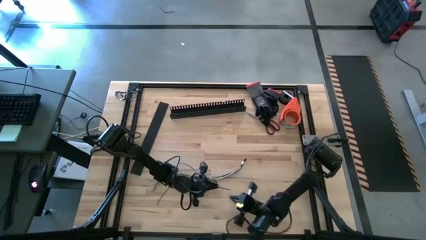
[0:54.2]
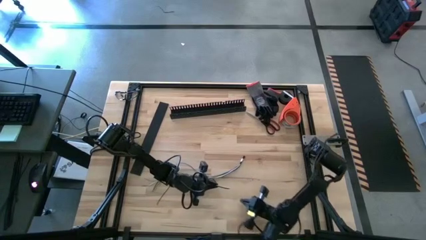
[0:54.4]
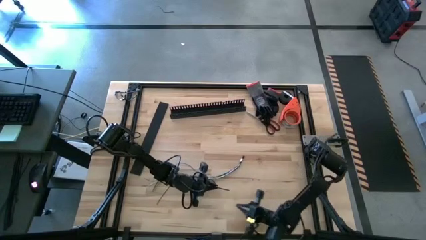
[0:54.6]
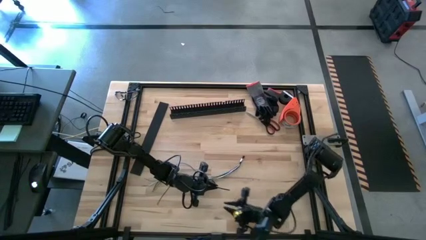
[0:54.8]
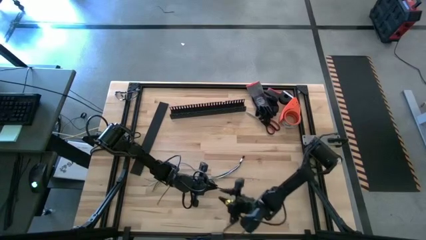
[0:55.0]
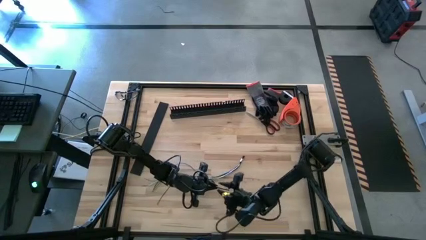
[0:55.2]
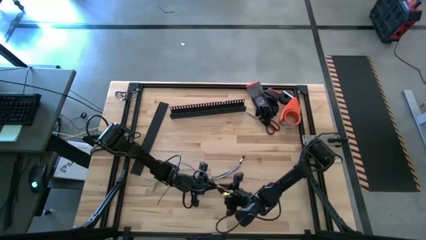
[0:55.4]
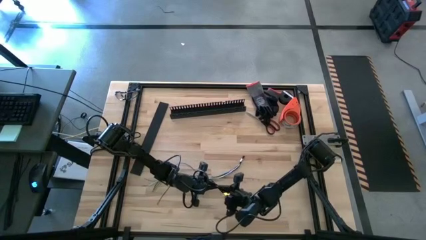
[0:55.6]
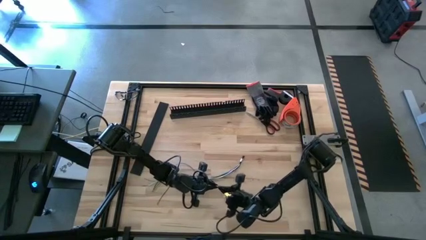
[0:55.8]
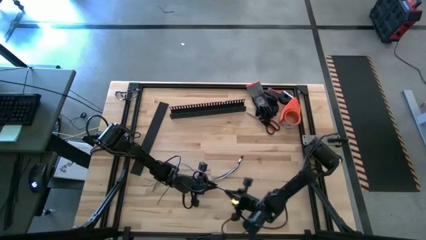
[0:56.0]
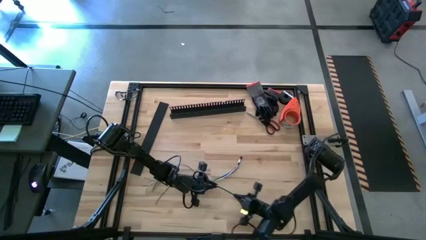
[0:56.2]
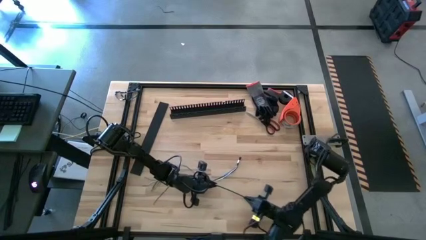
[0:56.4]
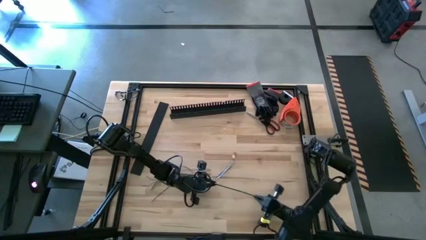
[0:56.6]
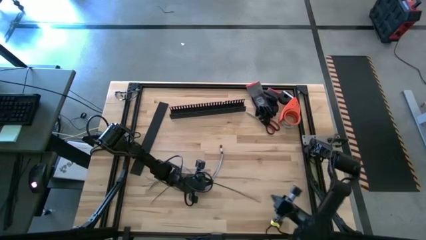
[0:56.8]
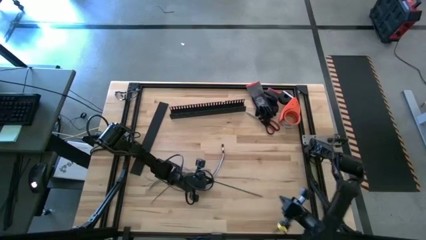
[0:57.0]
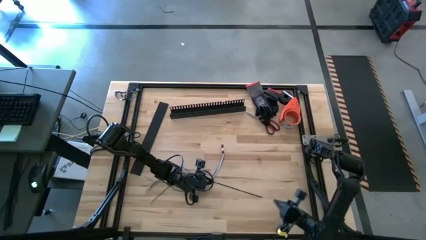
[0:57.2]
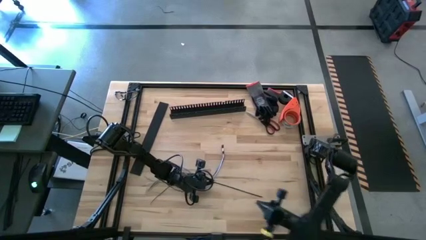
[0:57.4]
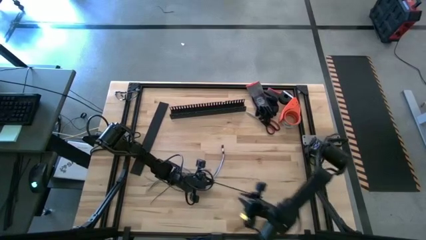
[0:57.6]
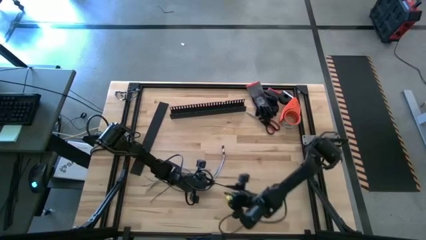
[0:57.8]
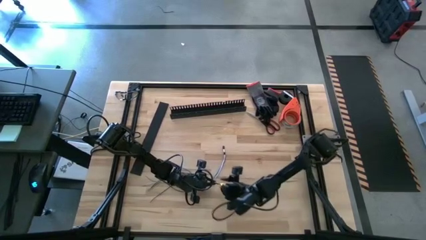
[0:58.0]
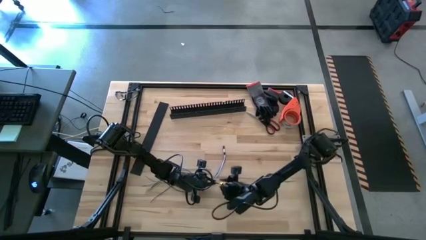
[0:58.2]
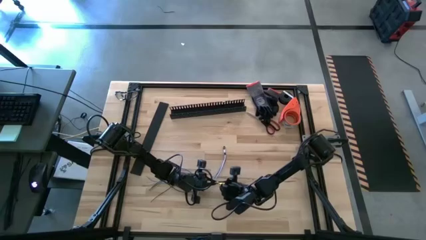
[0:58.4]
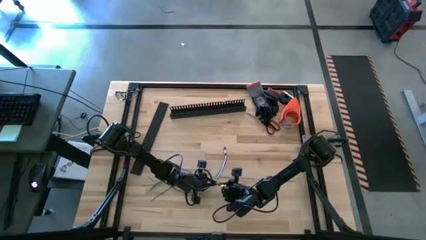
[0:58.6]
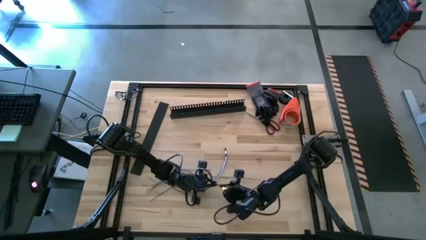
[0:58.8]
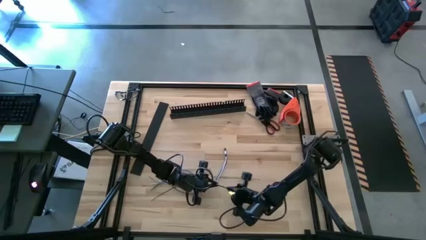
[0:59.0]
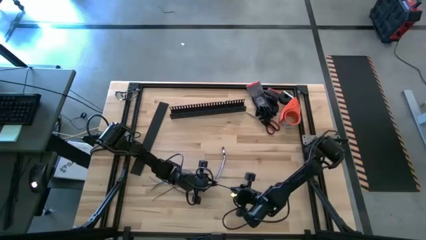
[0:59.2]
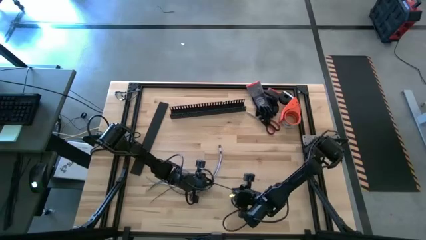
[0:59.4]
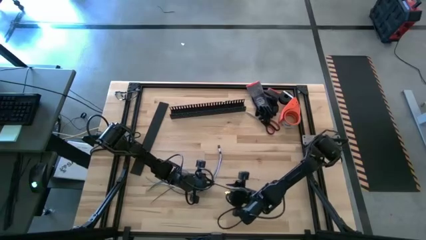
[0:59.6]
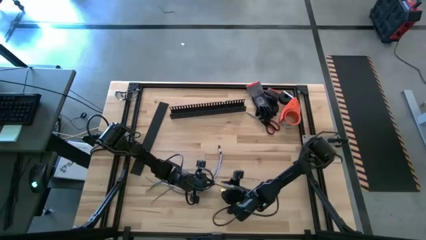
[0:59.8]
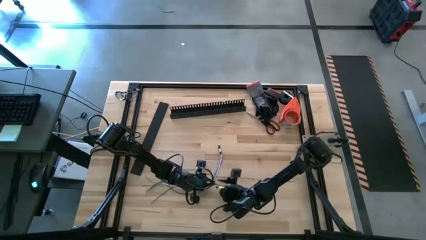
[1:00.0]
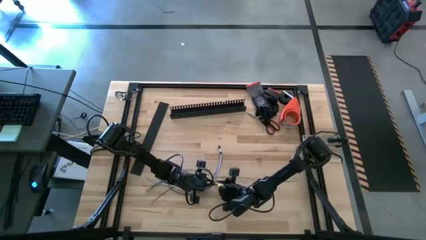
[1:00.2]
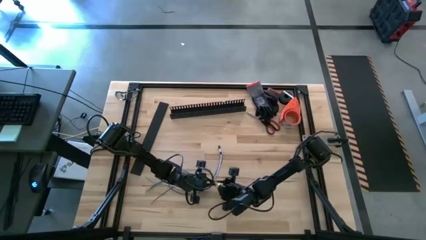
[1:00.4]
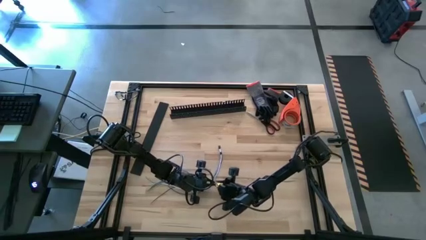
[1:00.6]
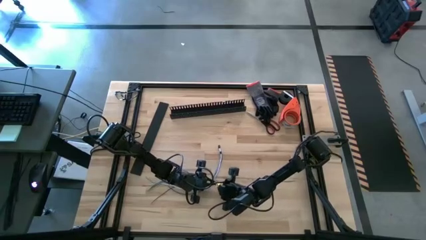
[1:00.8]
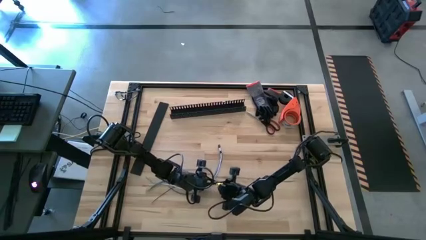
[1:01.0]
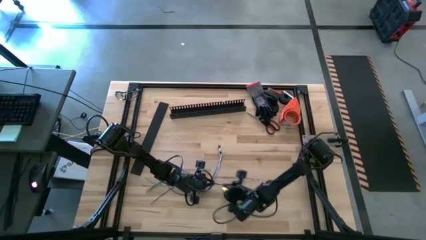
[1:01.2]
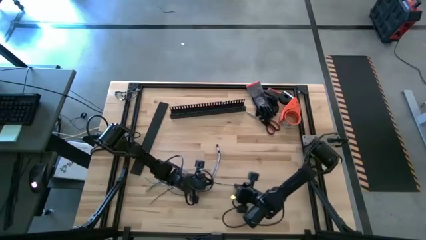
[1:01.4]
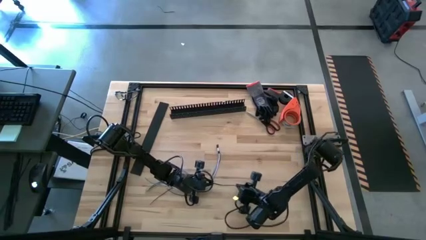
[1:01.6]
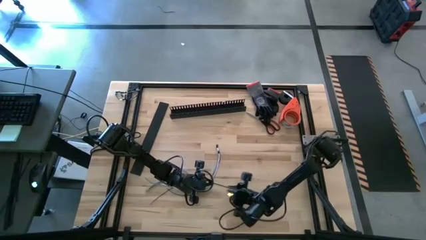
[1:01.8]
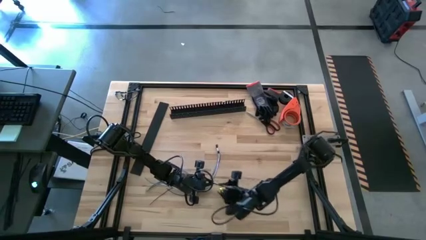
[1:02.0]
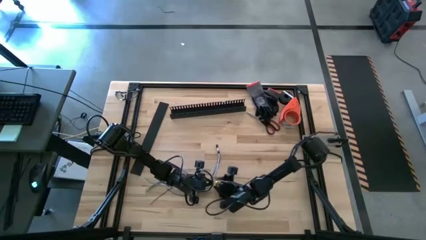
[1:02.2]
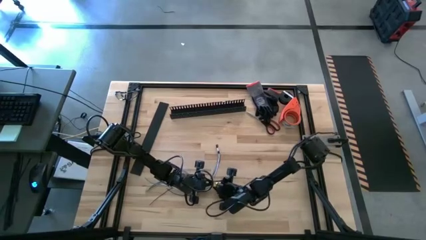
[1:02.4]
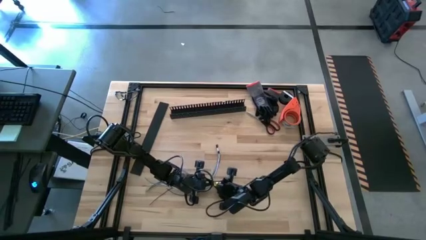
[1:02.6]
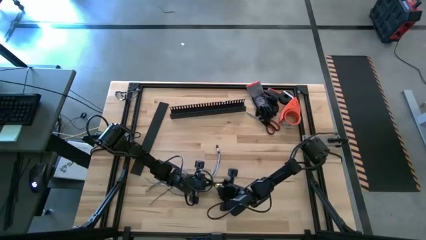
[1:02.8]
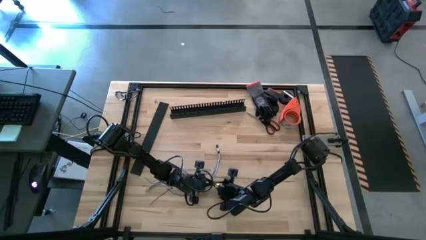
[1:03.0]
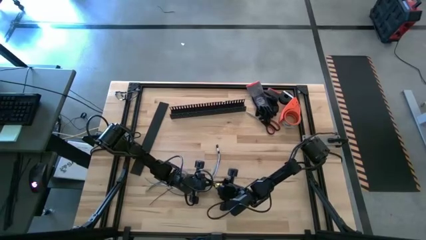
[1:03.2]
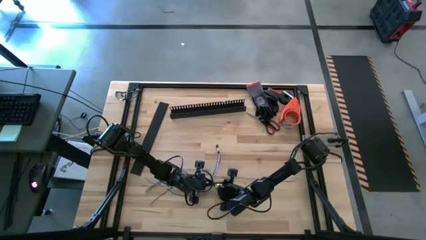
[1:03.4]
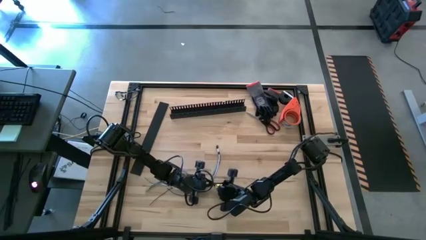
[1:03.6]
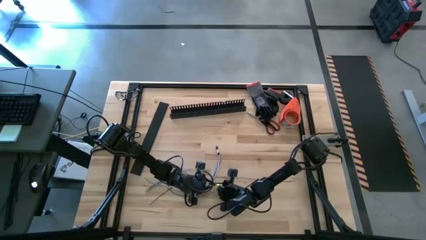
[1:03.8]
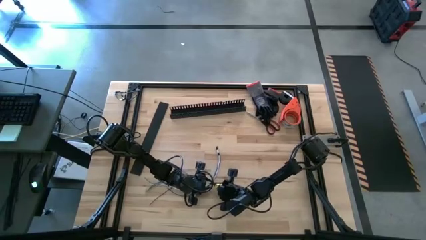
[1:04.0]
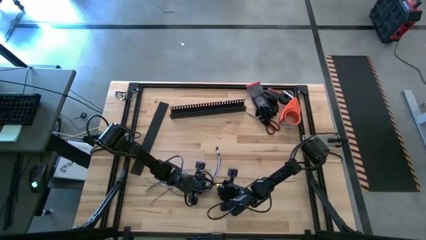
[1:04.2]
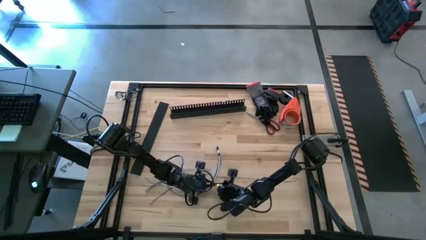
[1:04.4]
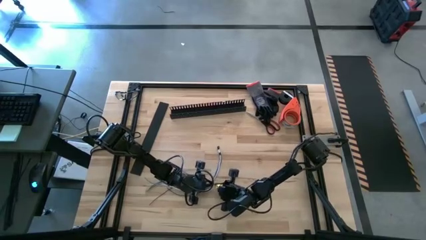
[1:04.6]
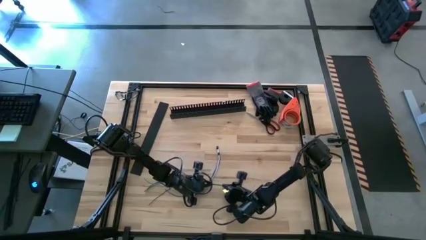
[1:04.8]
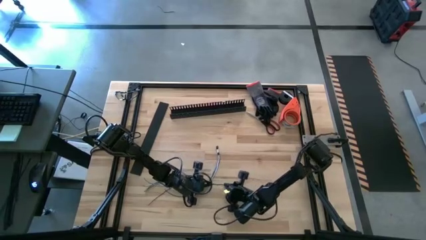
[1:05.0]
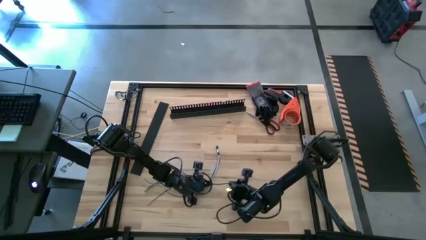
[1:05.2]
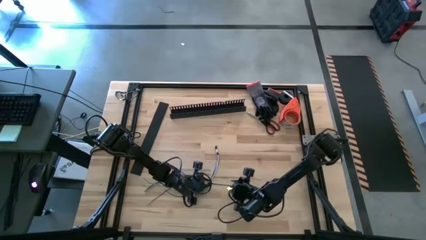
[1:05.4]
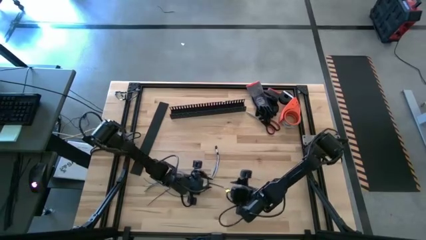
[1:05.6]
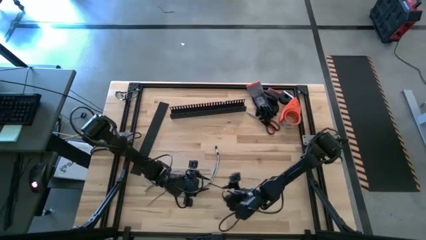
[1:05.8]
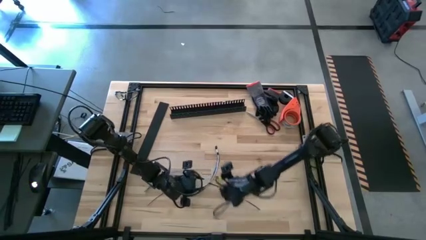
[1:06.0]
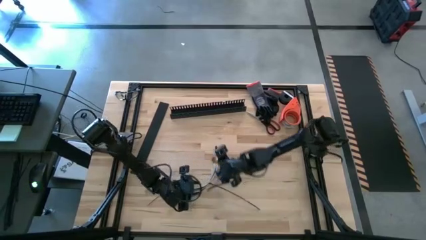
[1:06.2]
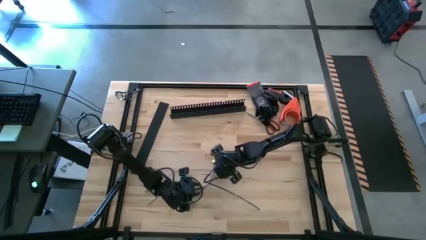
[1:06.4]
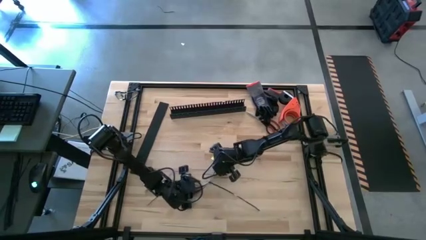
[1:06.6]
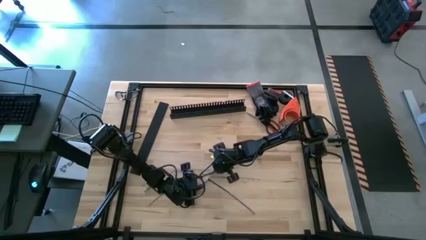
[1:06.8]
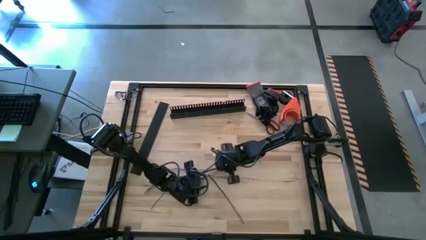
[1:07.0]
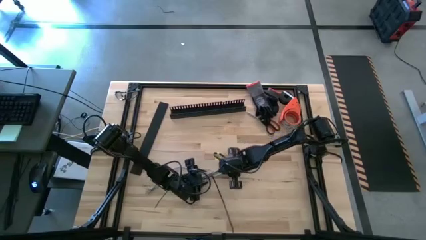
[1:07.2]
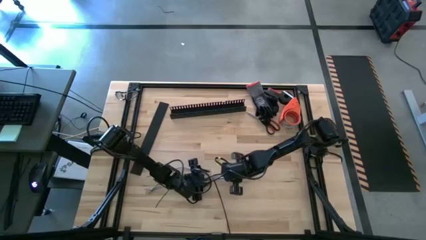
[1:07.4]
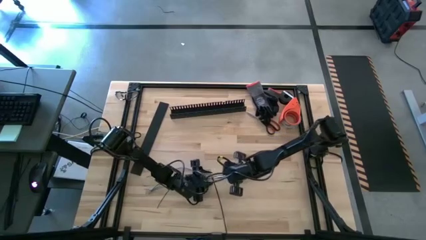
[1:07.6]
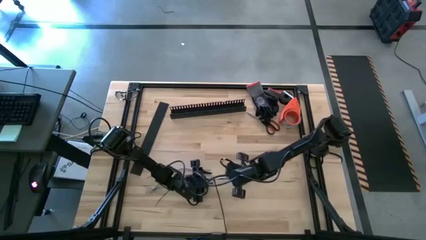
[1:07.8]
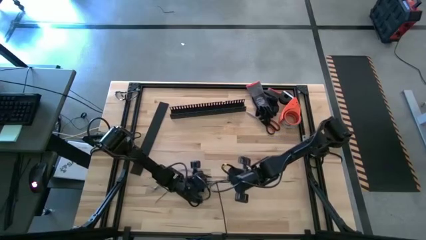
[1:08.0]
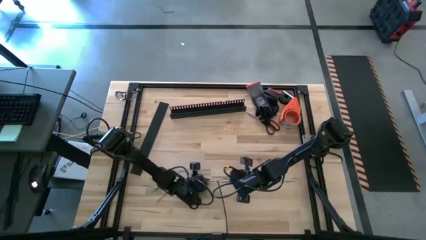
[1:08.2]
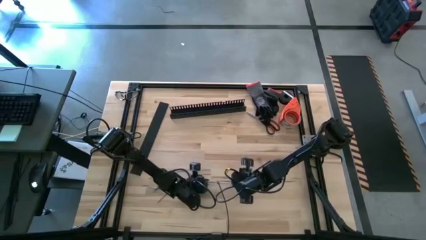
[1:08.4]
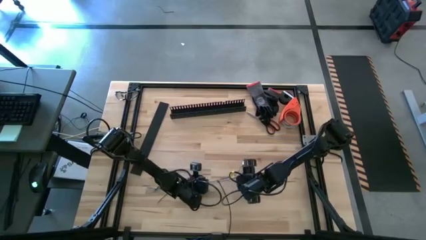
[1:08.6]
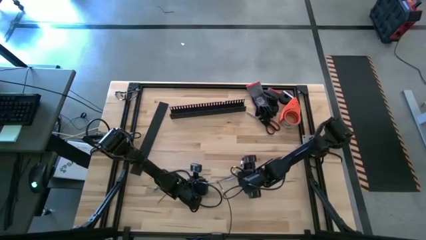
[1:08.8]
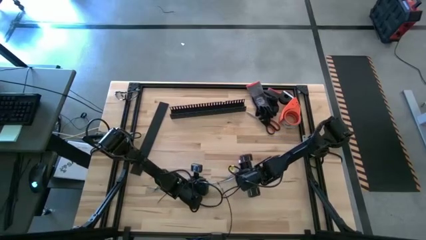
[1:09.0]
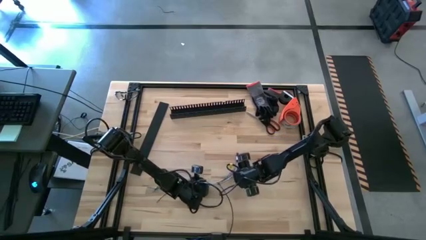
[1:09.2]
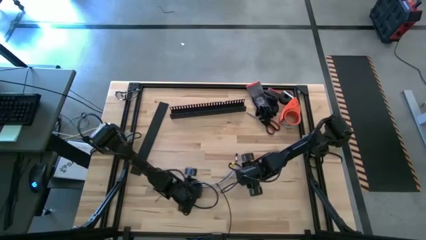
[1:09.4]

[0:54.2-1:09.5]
Task: Ziptie cables
Wrap the cables together using a black zip tie
